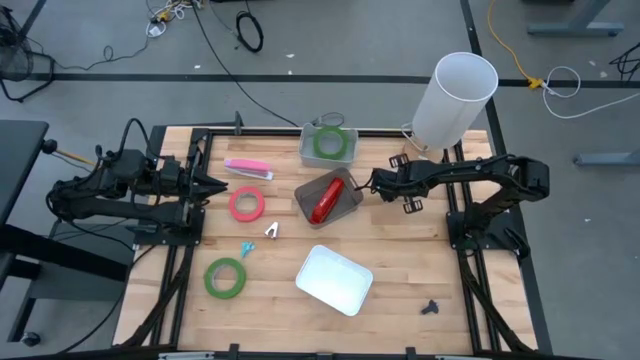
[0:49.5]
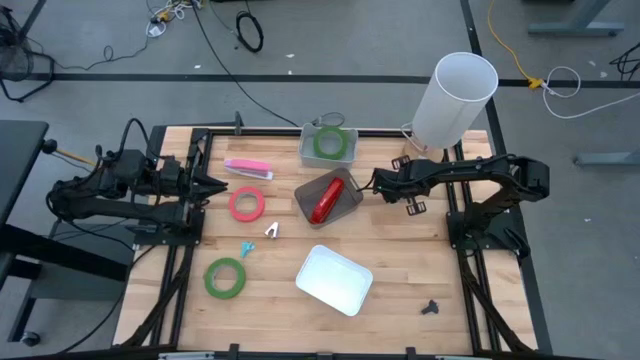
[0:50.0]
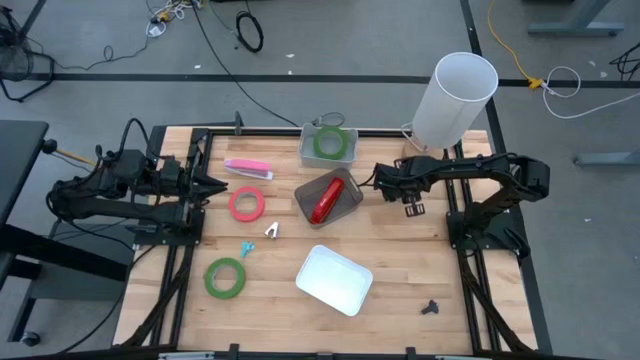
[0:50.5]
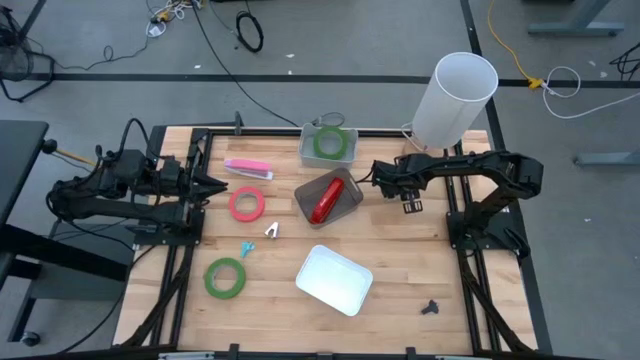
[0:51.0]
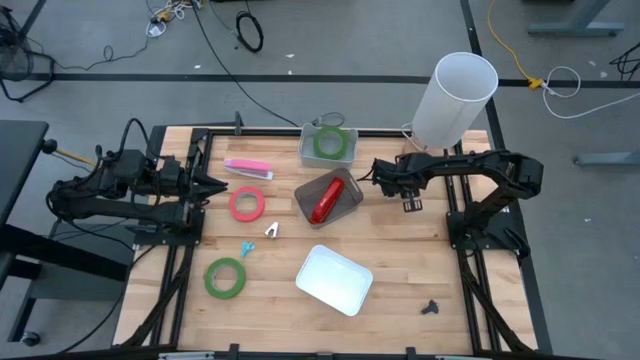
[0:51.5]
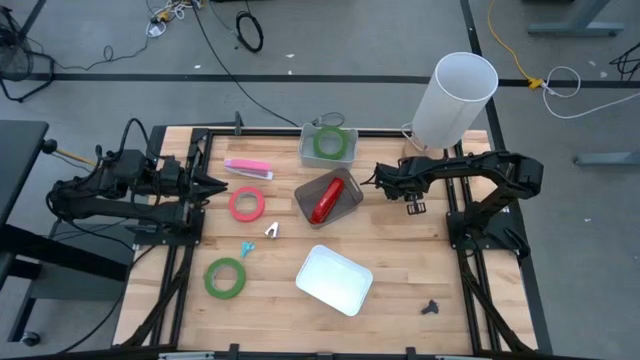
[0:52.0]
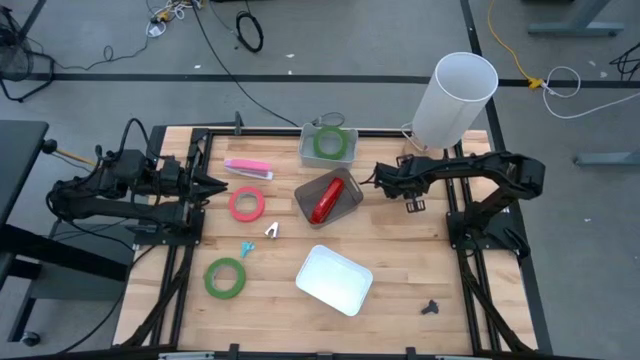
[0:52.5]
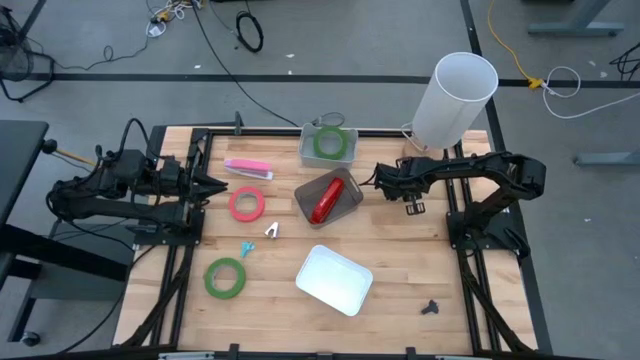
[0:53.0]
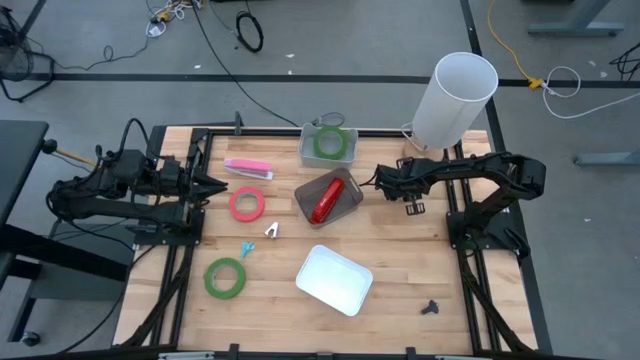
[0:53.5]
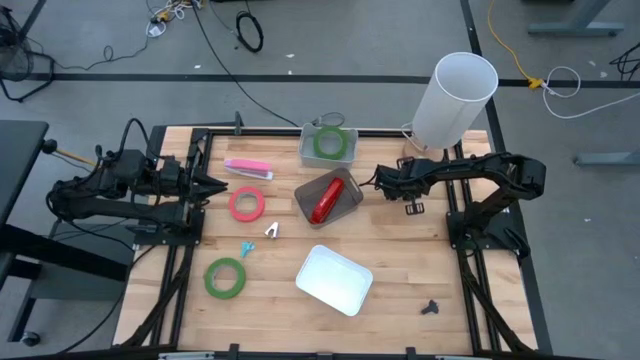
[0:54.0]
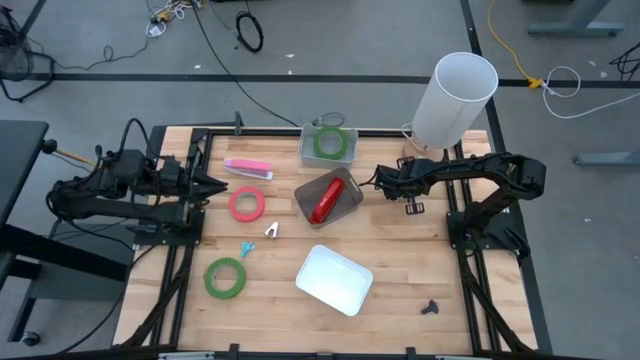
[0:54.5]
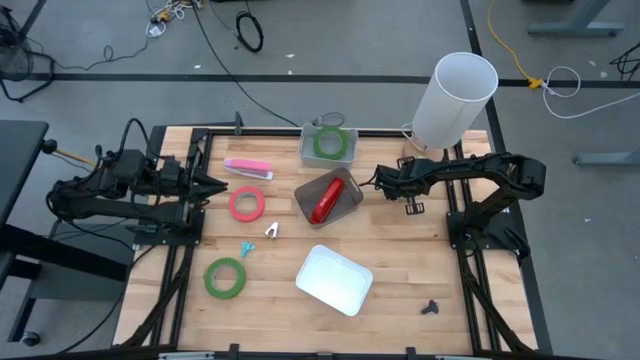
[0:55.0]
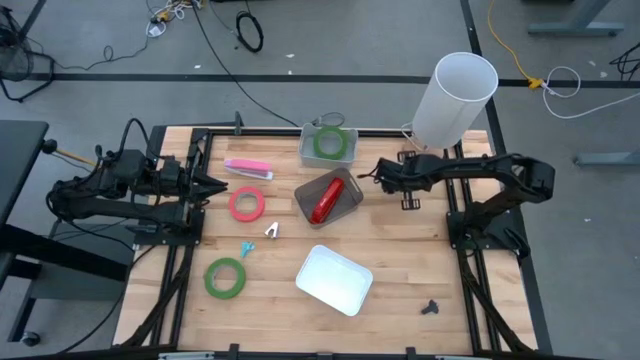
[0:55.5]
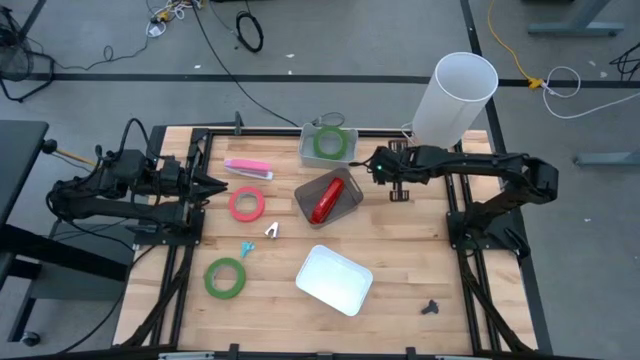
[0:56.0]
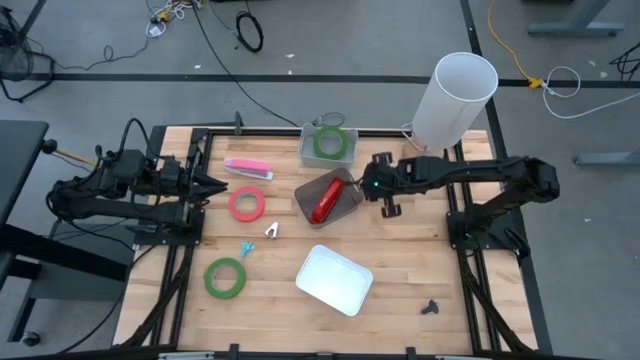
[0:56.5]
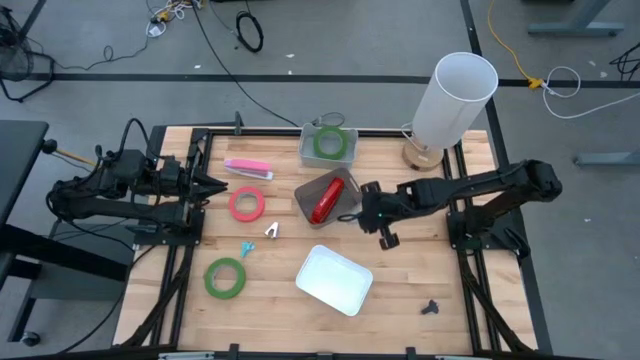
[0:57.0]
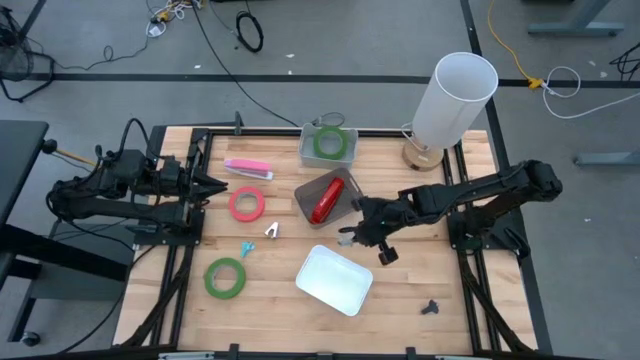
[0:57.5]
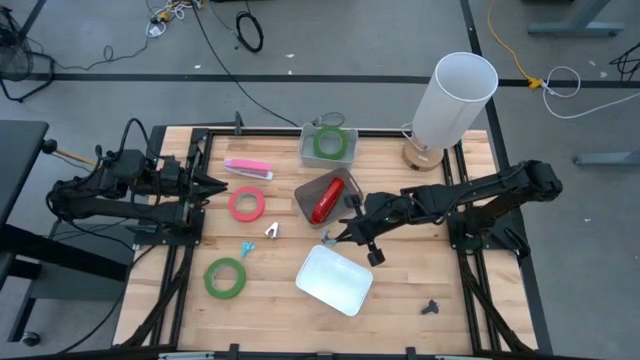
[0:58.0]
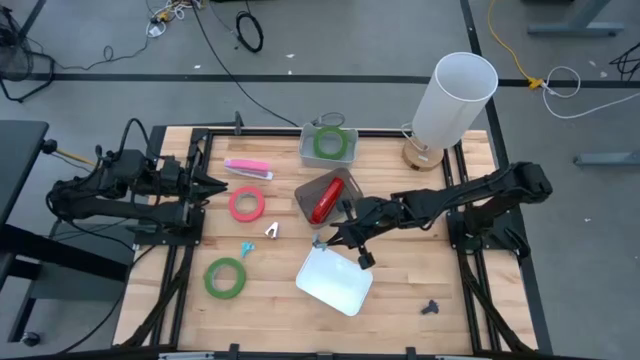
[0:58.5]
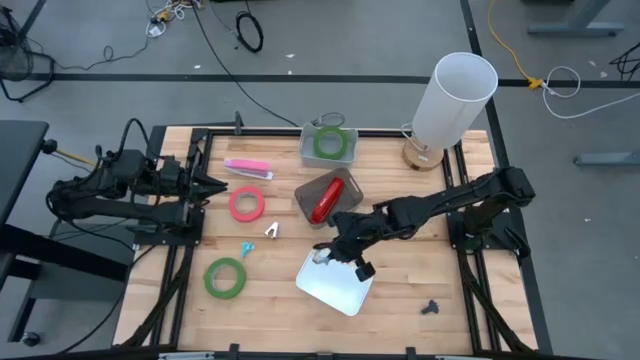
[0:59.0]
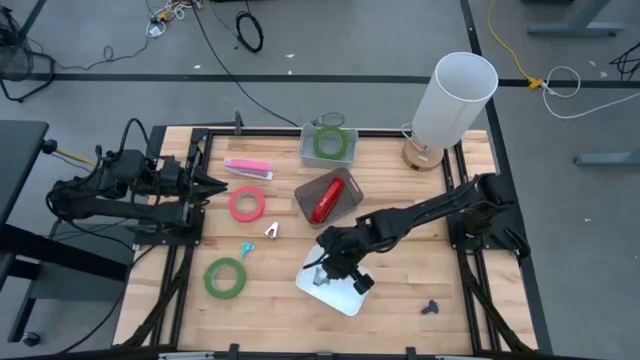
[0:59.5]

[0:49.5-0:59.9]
Task: Pick and place Stapler, Stapler remover, tape
Put the top light blue staple remover into the white bin

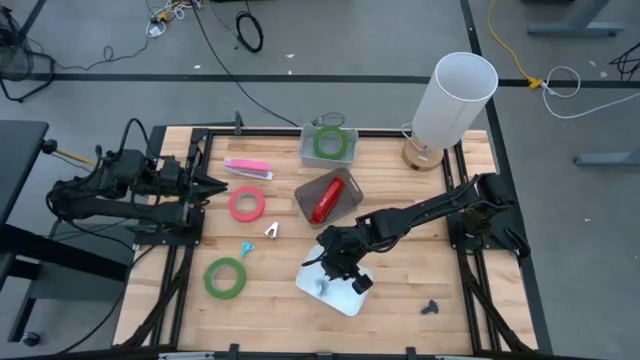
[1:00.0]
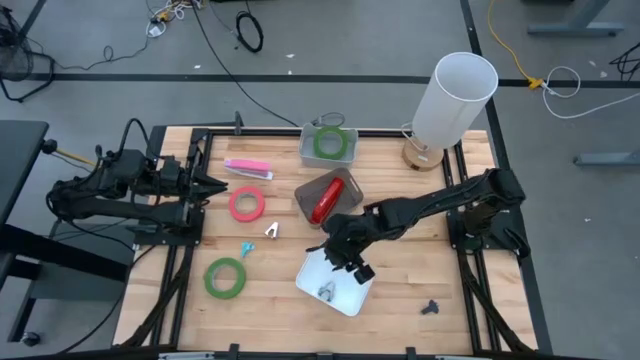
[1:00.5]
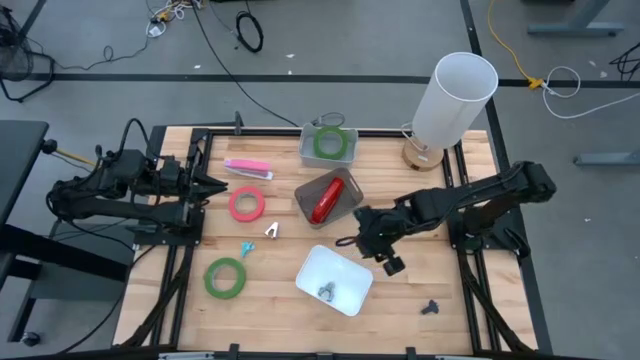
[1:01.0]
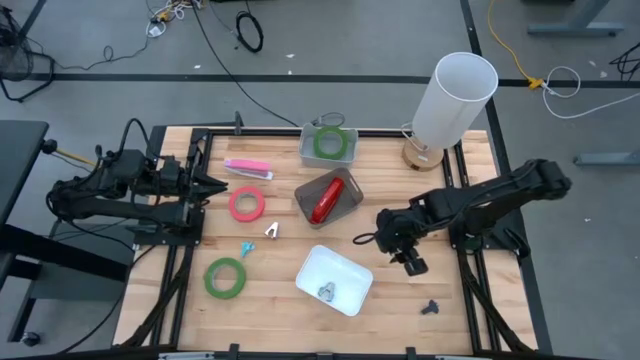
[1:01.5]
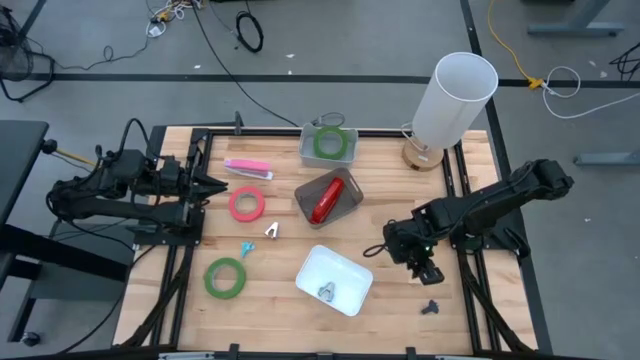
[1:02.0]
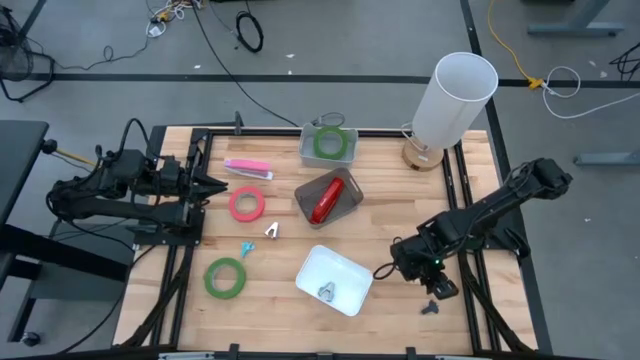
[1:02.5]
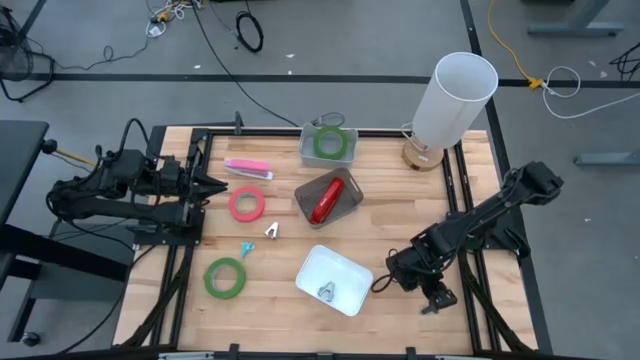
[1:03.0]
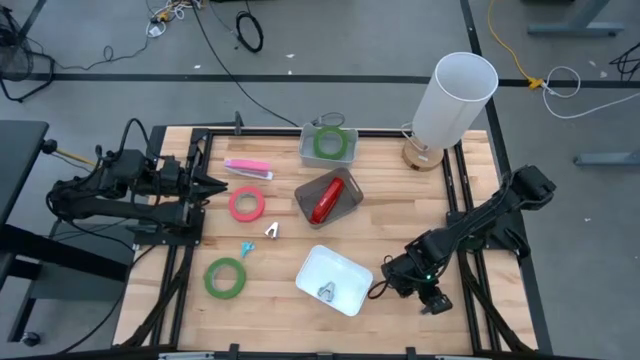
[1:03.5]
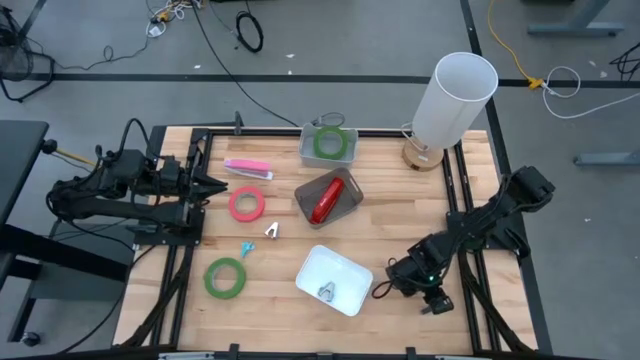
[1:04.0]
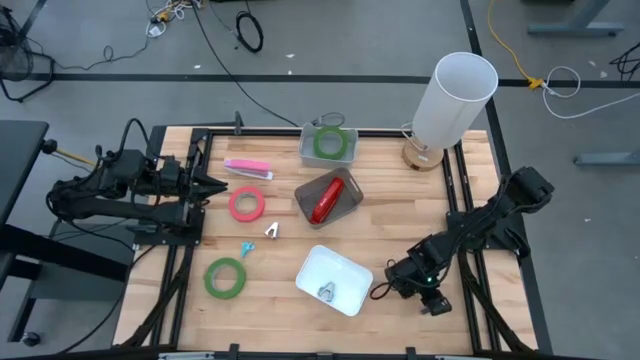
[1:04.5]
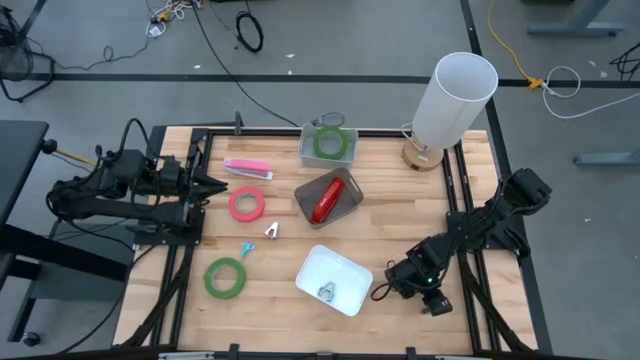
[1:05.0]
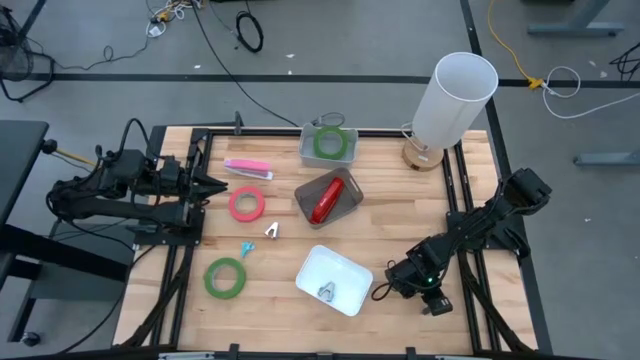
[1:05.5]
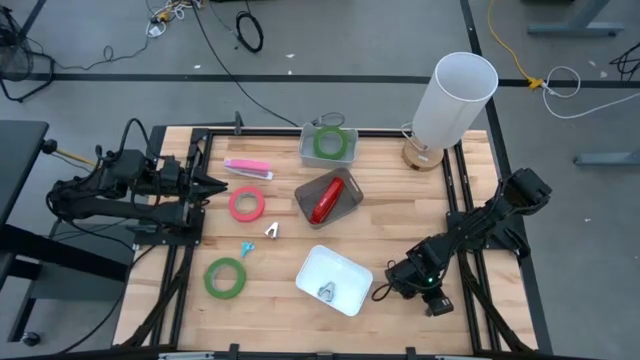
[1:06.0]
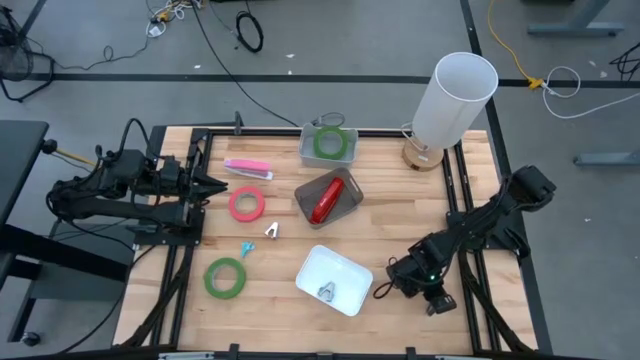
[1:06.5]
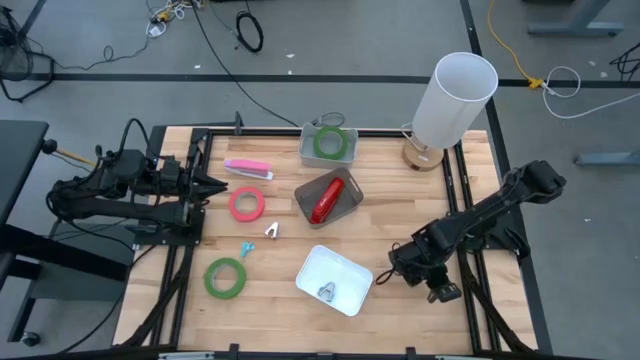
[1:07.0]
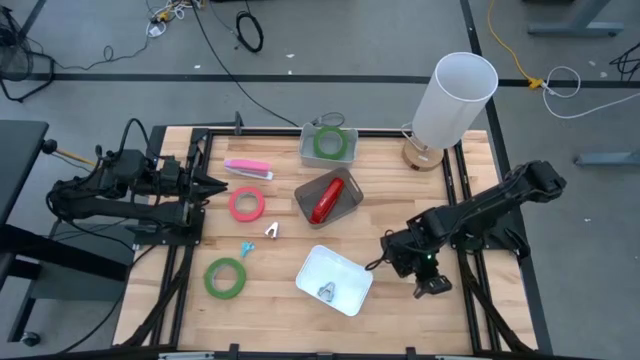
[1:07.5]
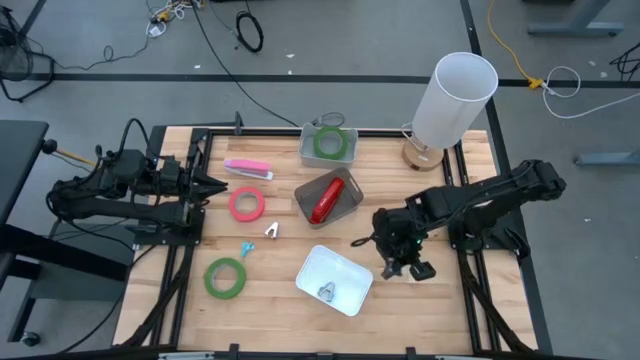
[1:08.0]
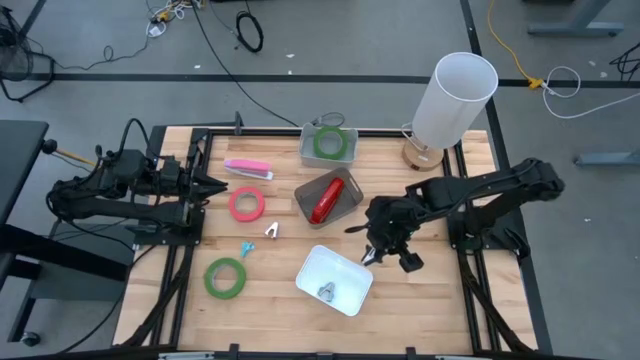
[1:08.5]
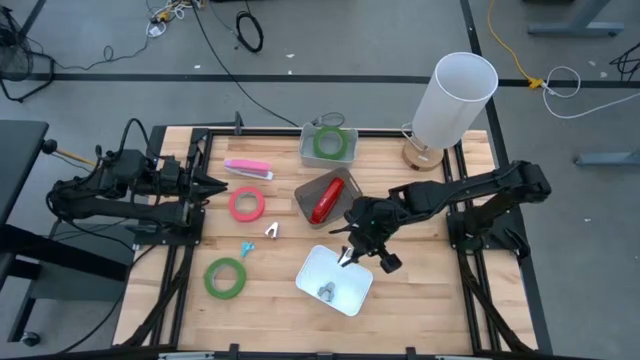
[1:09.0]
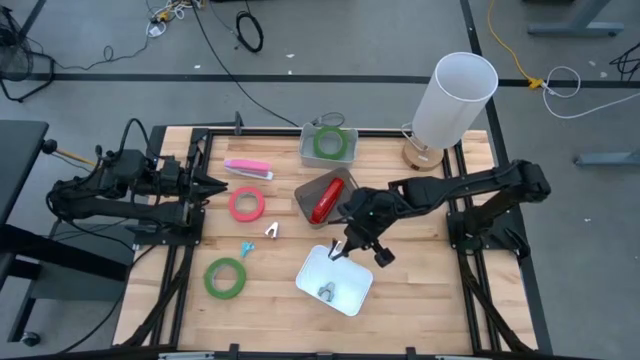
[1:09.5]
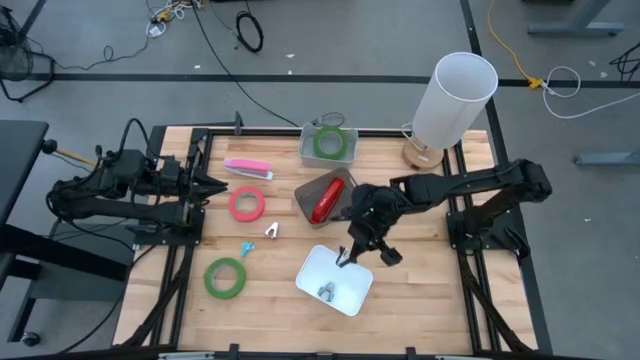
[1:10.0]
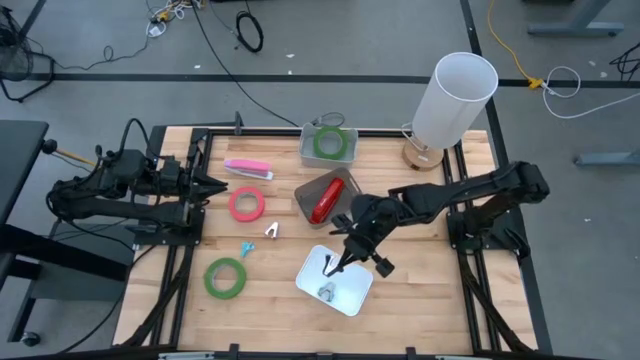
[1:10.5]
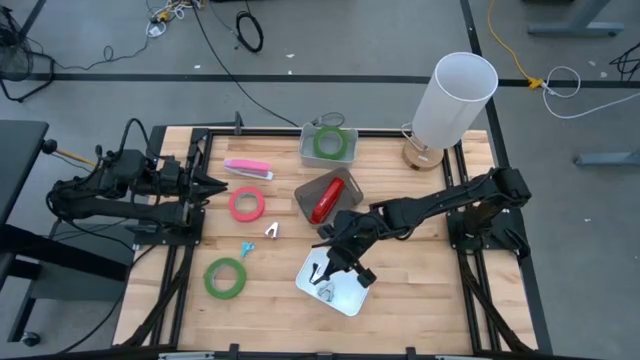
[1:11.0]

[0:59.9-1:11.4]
Put the black staple remover into the white bin
